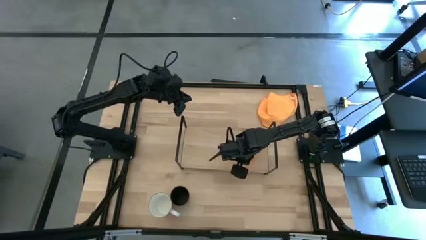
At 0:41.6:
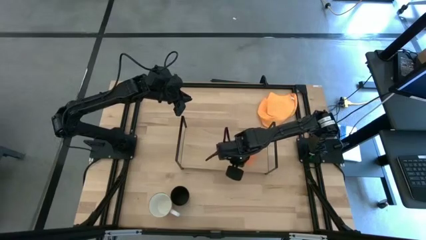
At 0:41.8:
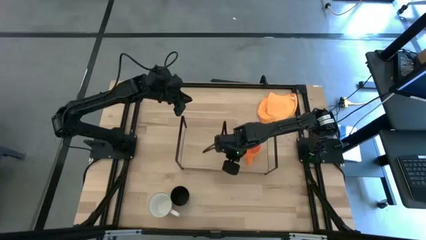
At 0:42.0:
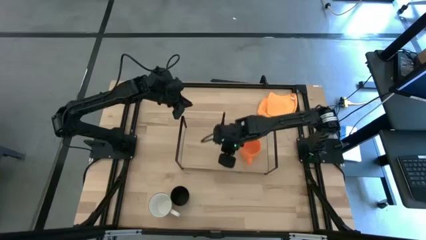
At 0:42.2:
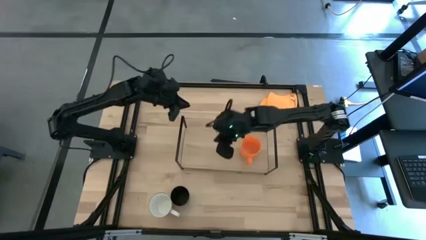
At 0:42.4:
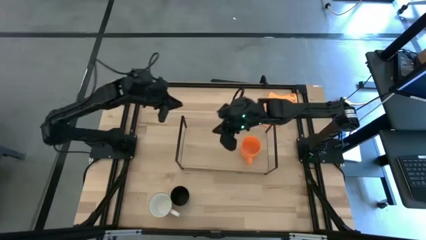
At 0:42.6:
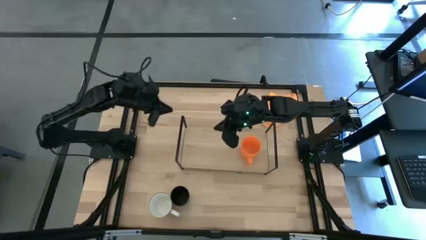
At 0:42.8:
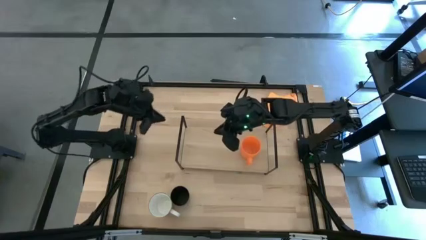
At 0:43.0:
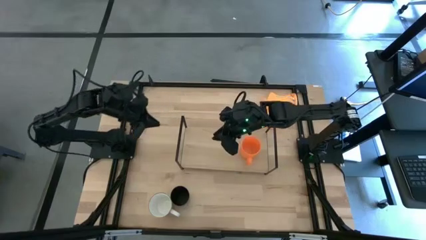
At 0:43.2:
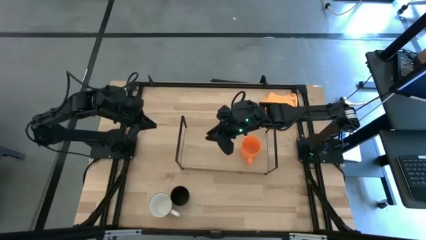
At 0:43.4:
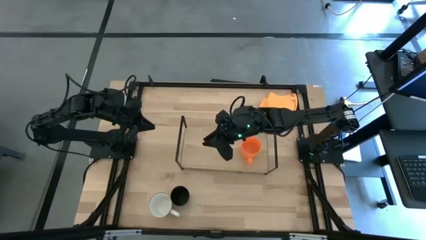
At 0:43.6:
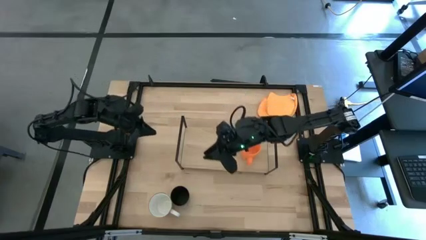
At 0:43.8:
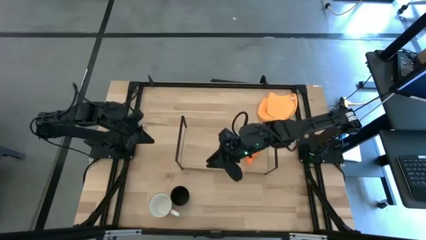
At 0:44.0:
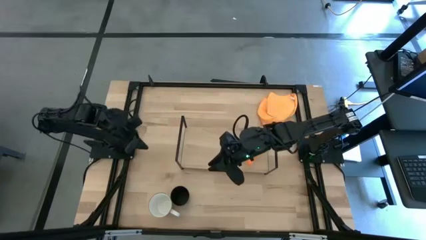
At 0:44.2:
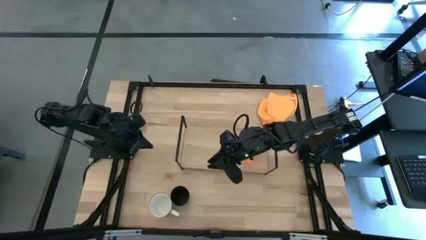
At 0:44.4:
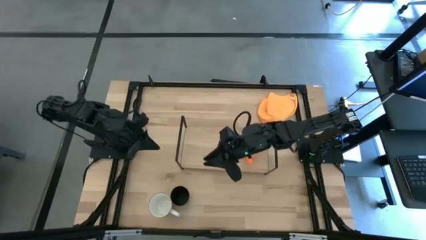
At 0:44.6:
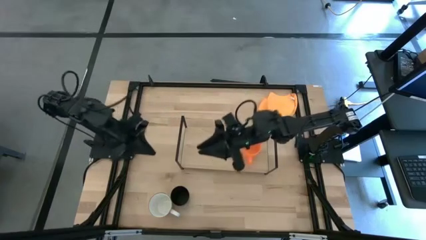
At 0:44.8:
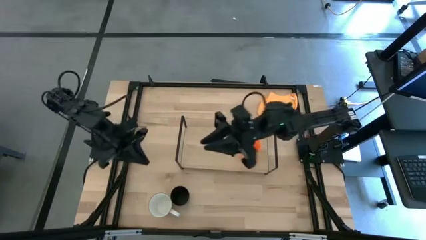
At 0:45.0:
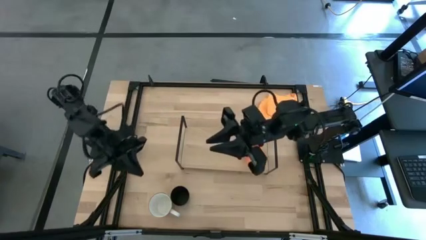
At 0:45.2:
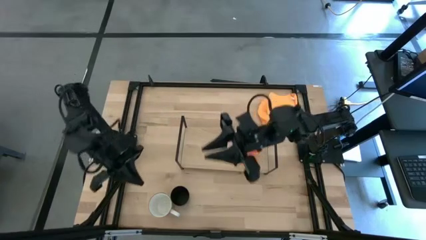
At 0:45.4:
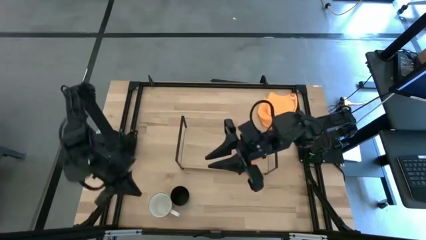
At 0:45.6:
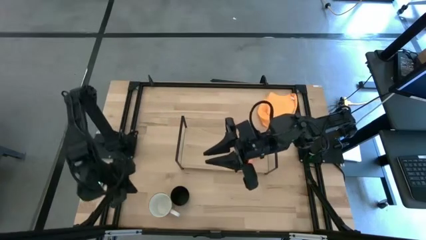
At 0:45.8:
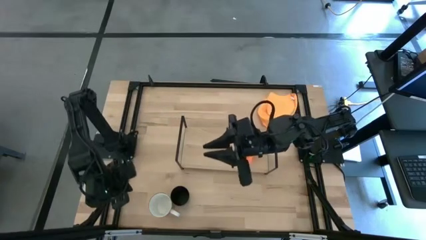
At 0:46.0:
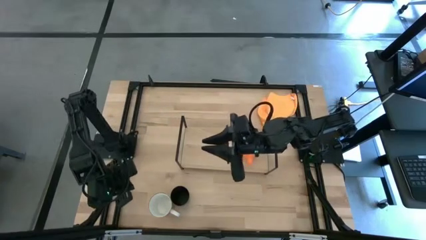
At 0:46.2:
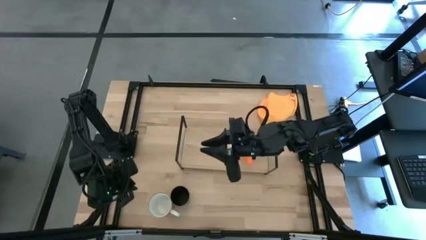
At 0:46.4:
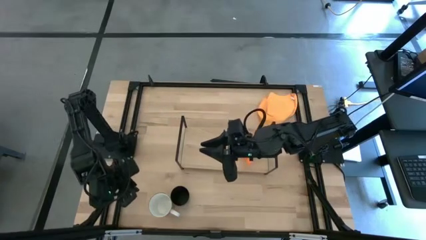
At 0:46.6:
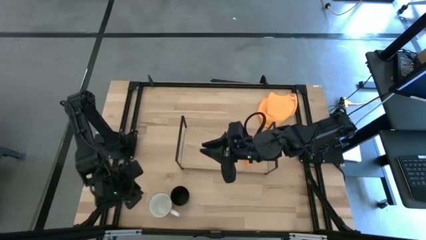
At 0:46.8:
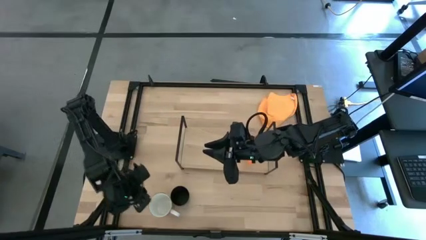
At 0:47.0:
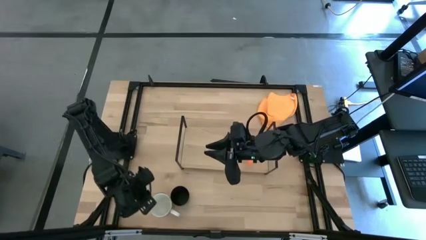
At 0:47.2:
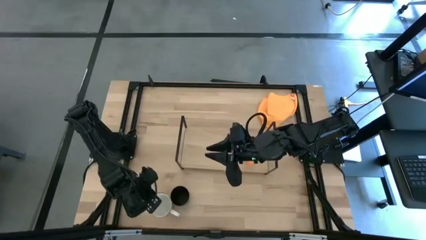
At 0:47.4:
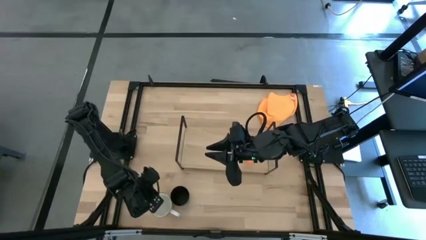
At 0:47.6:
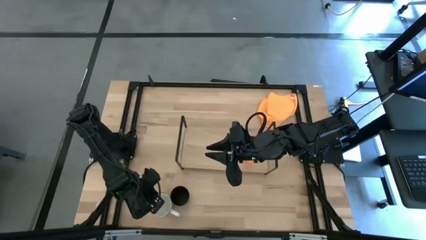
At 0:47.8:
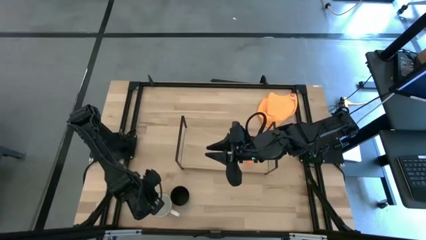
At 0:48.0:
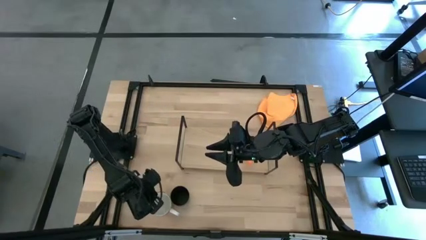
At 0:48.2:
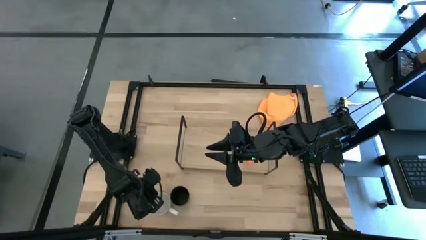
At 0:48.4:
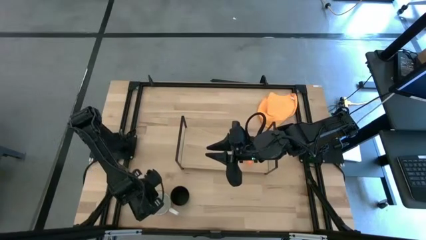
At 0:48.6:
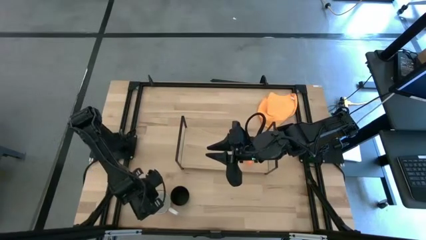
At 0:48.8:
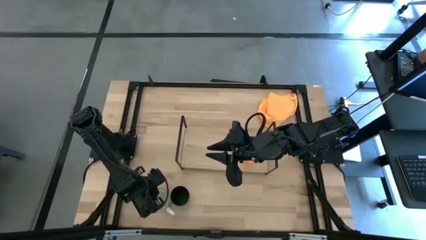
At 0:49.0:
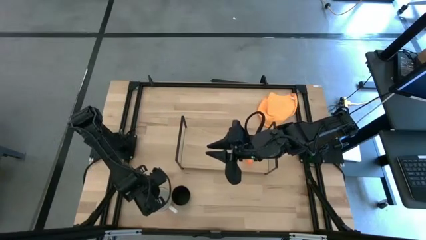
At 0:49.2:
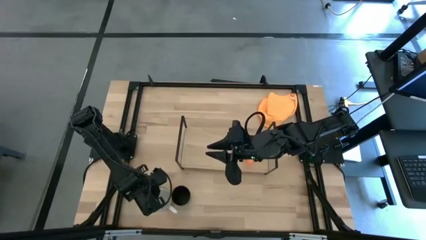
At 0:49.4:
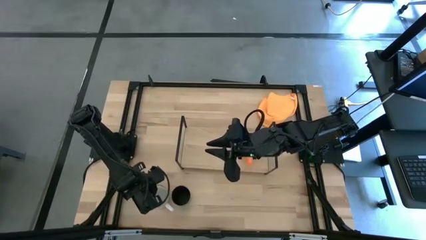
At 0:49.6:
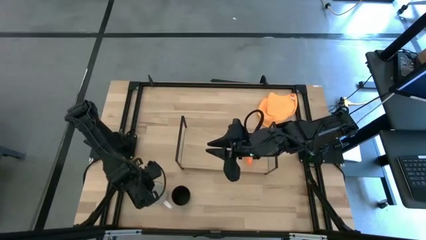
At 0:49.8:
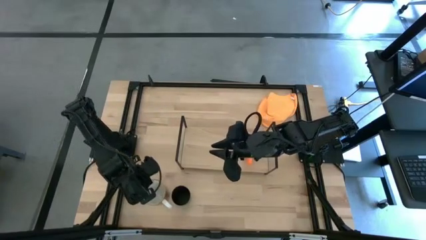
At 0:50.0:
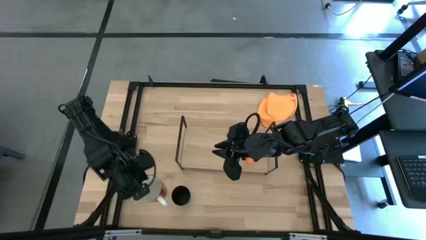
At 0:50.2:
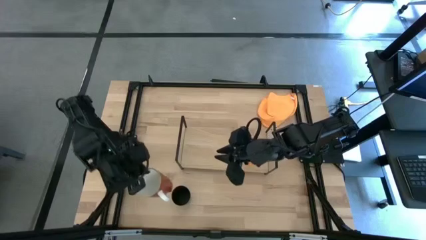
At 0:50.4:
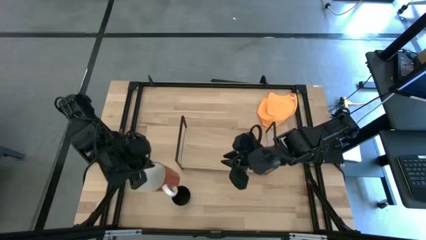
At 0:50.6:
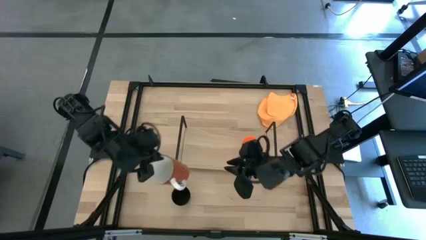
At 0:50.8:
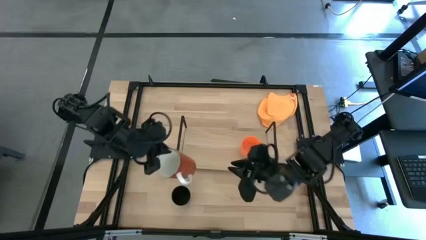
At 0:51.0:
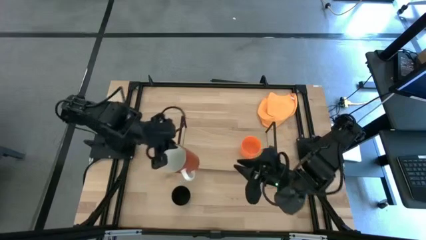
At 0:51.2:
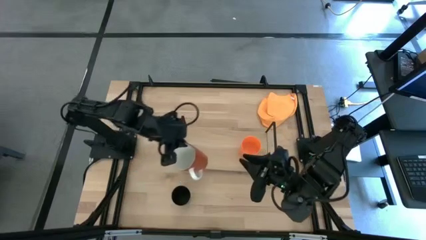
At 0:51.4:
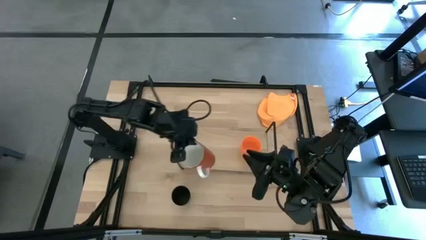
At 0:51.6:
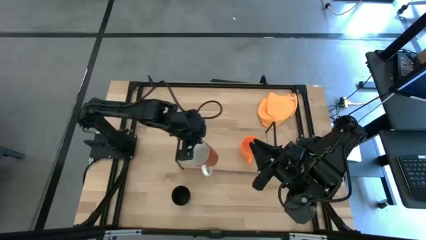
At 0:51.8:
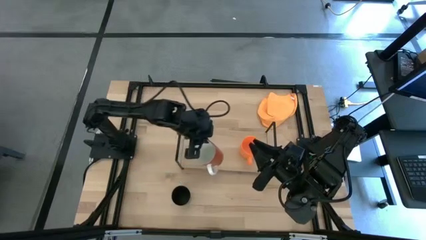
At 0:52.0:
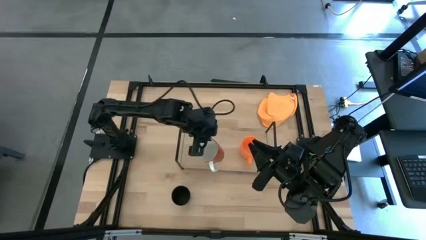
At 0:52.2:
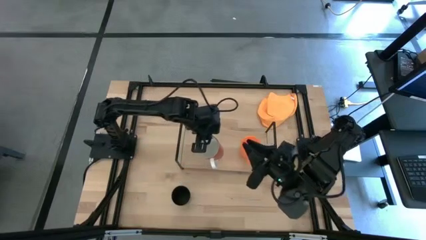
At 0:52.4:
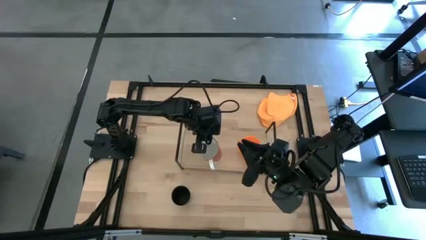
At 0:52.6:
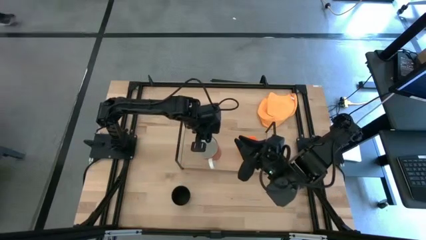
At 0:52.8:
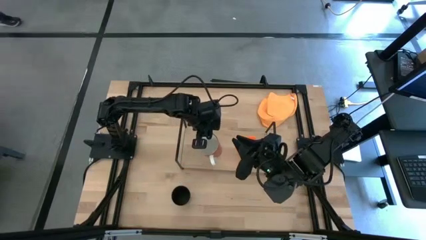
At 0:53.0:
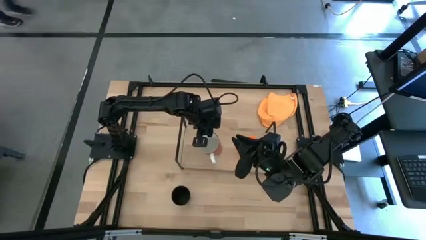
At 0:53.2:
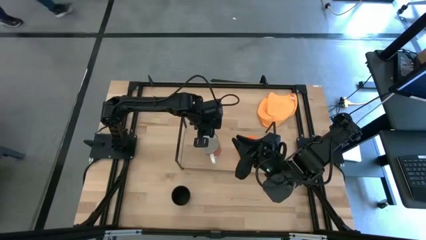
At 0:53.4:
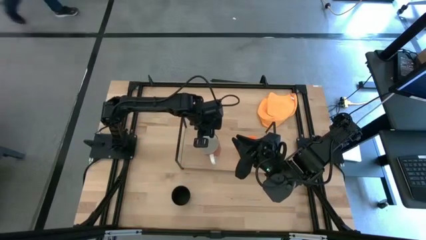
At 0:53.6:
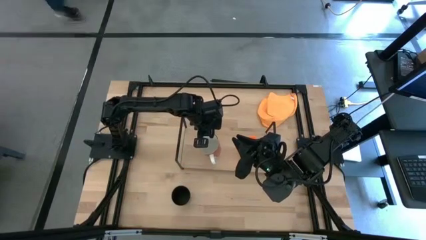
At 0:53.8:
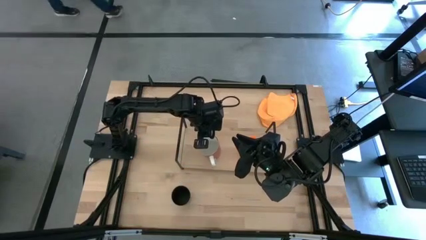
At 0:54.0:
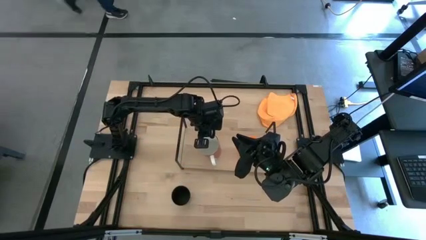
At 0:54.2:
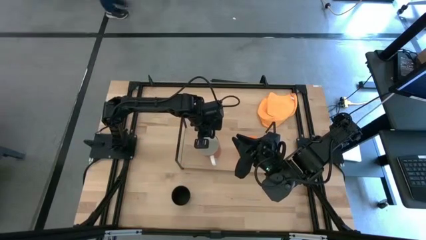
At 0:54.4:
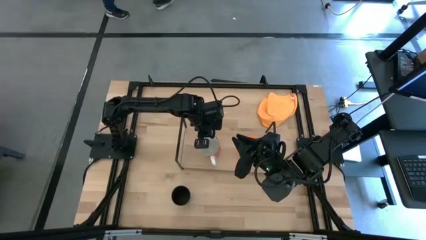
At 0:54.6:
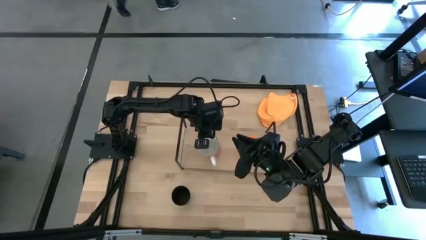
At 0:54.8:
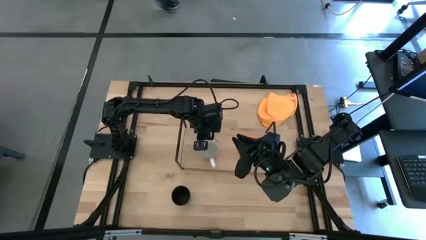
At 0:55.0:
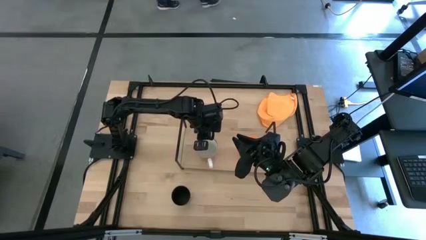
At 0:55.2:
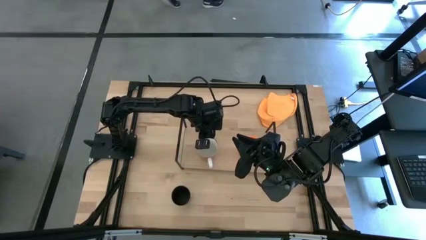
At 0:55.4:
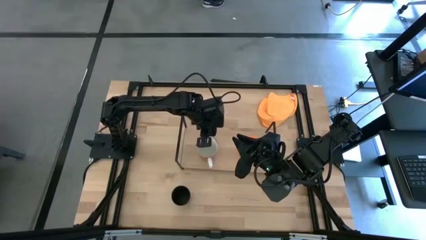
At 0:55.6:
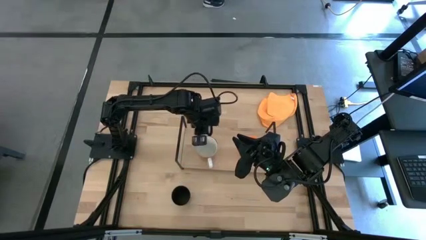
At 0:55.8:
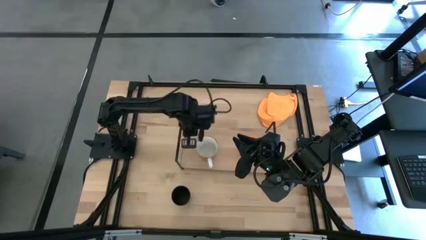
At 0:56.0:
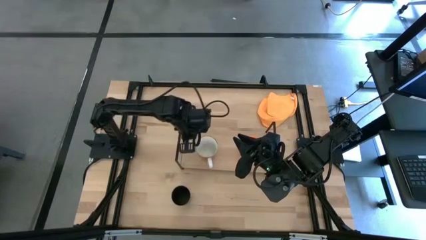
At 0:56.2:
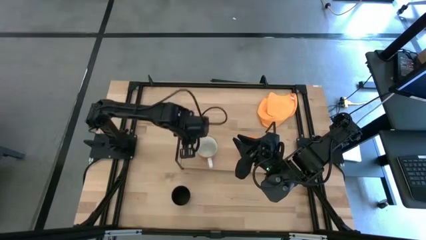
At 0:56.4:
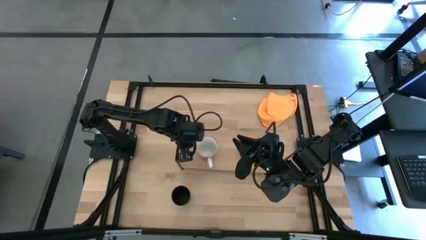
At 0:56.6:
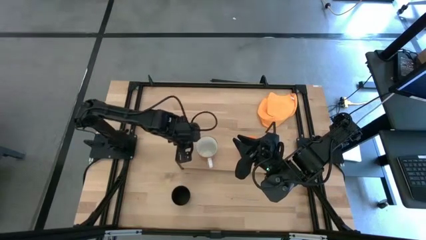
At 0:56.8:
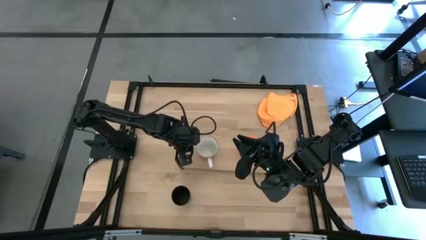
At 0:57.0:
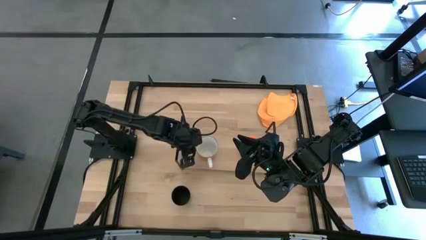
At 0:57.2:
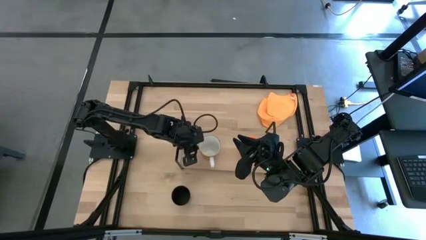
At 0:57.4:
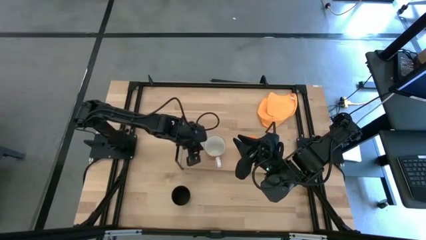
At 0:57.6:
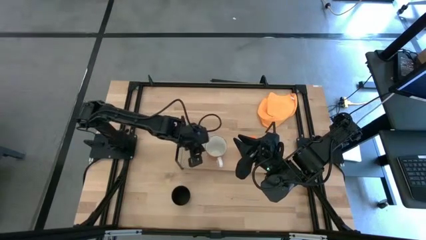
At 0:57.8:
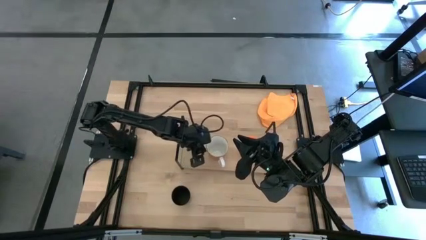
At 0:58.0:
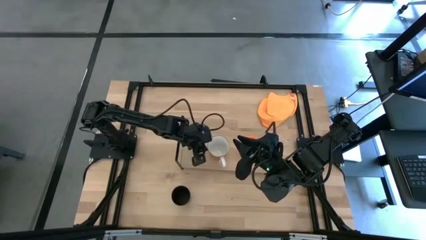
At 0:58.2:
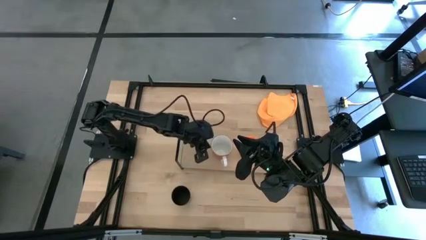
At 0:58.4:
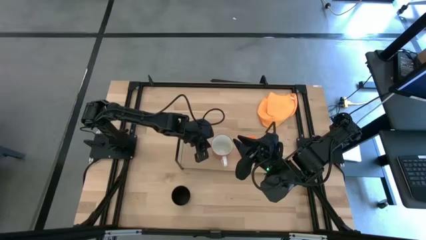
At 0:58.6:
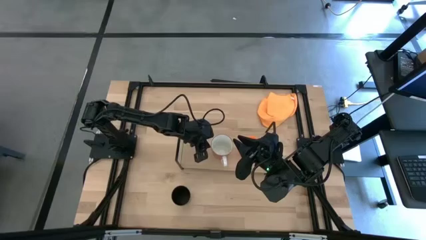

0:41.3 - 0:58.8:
Task: Stack small to large cups/mugs on shelf
Put the brown mug on the shelf
